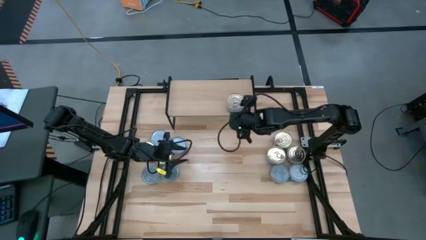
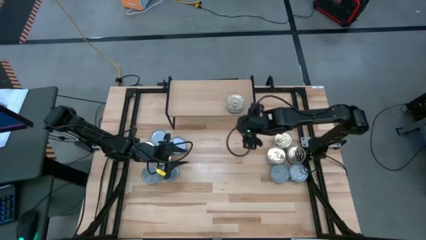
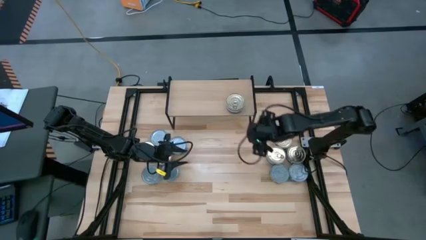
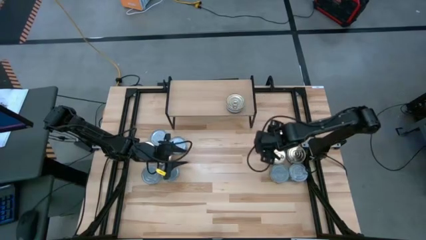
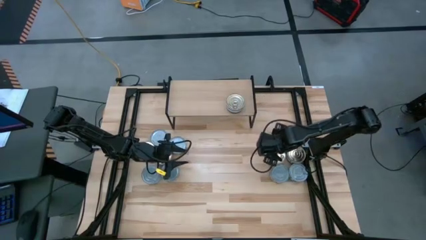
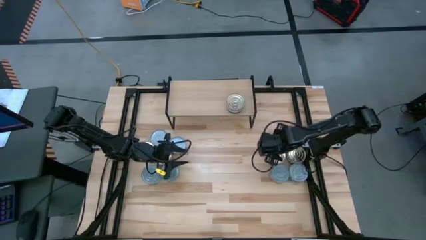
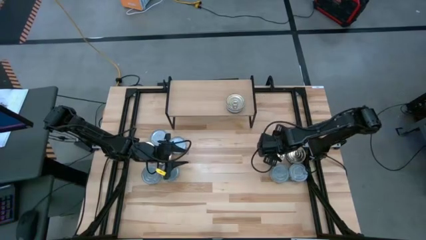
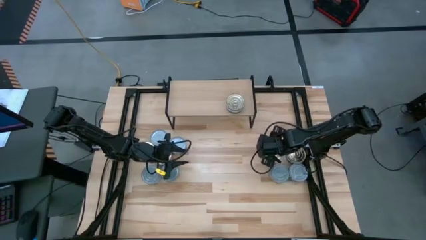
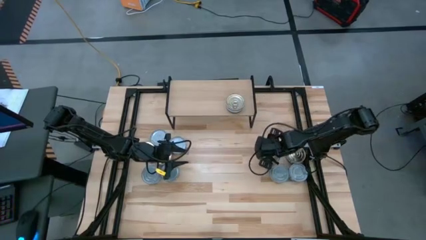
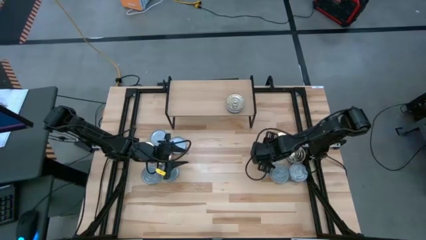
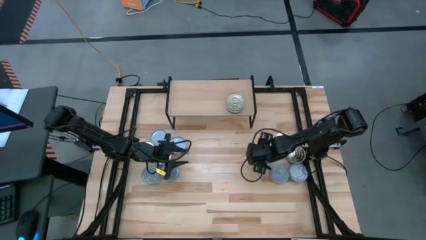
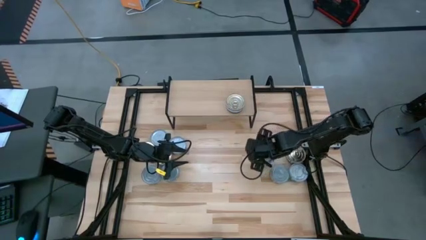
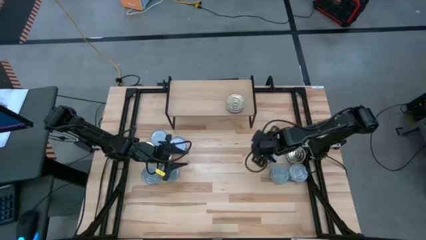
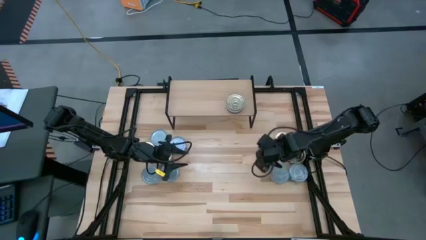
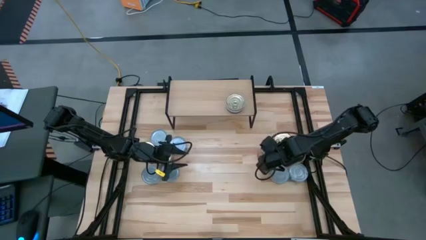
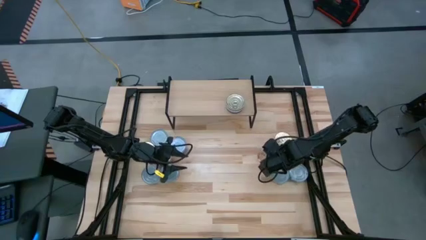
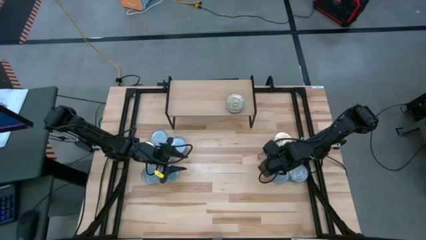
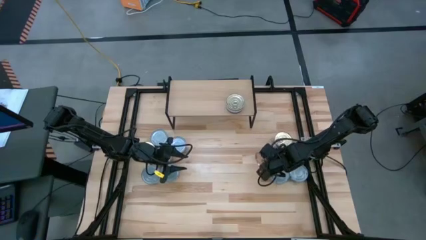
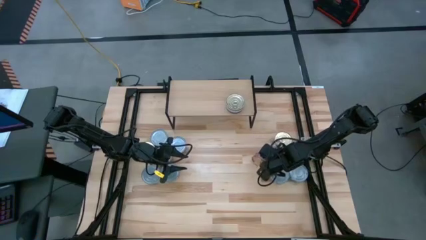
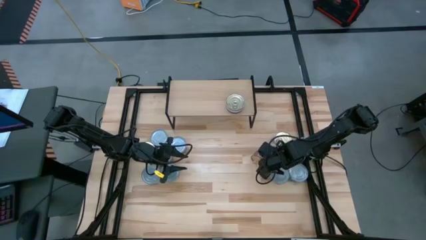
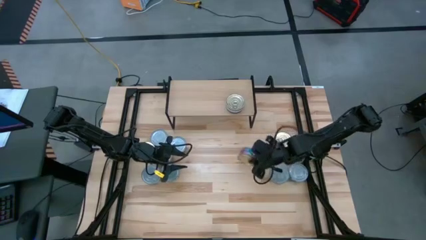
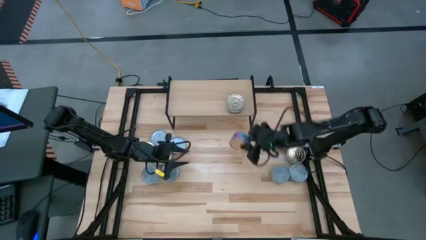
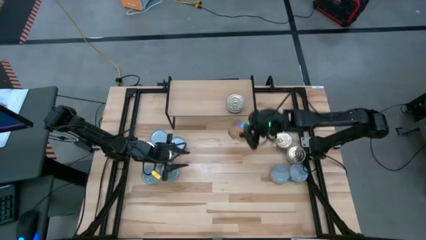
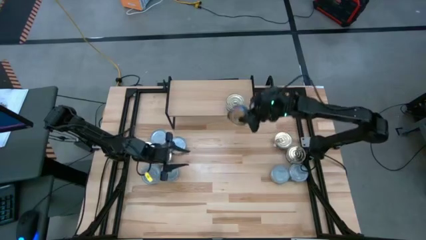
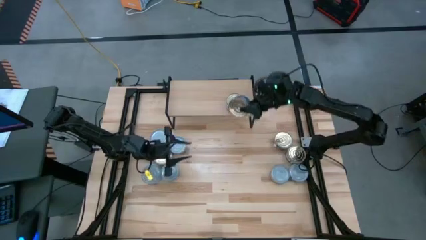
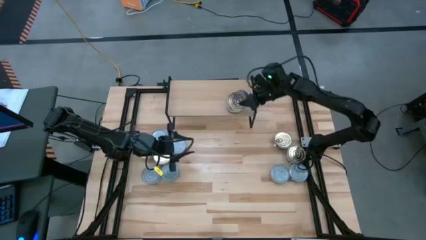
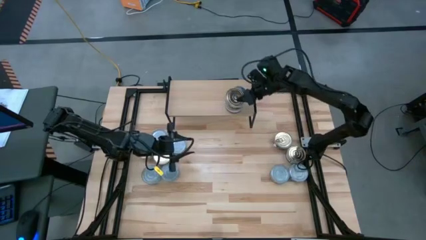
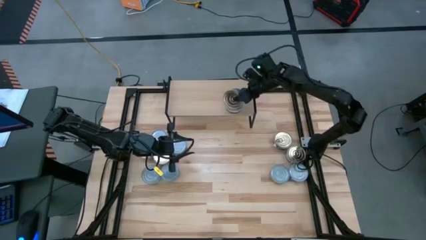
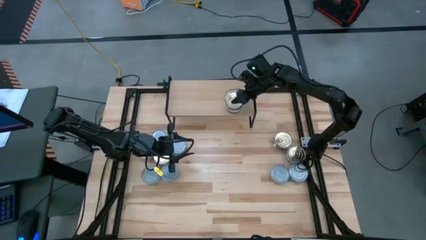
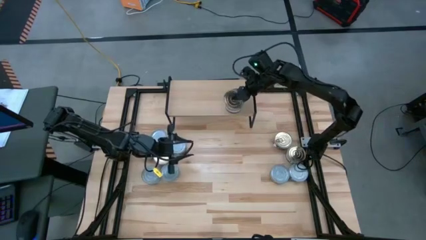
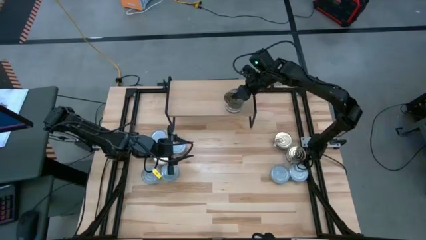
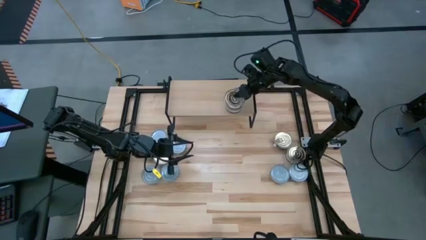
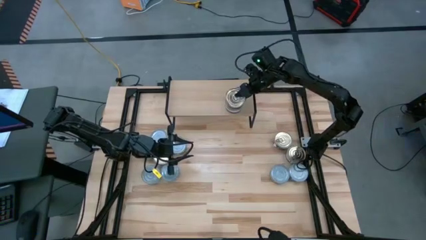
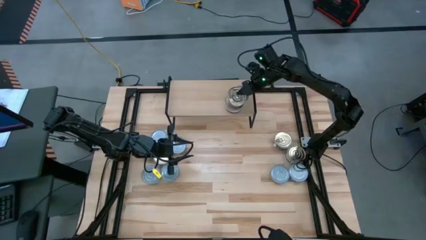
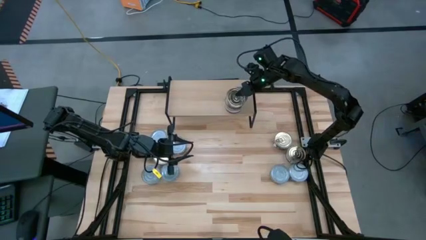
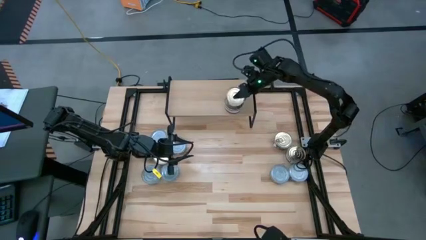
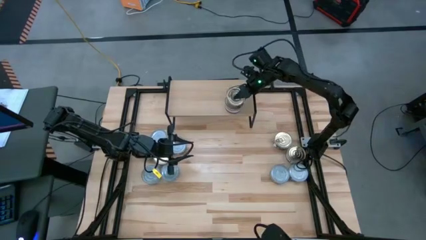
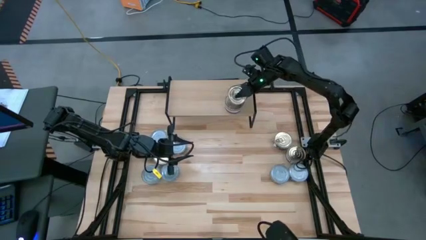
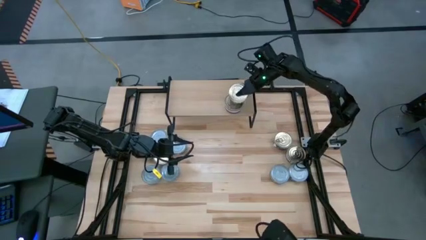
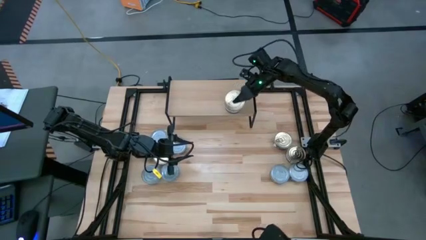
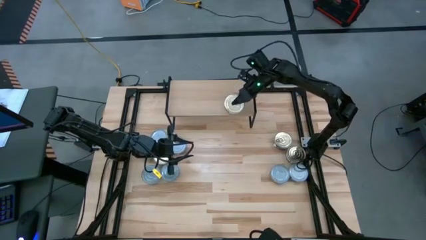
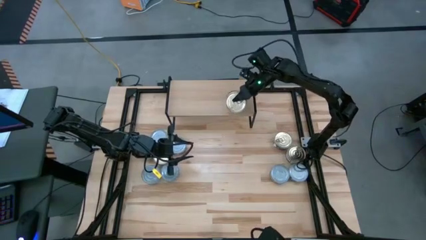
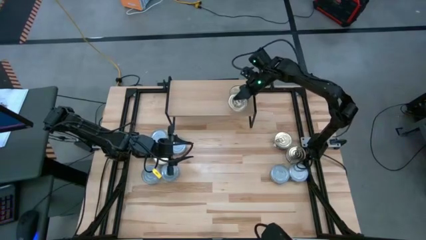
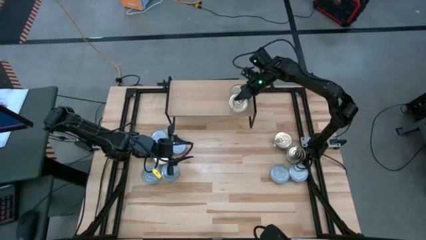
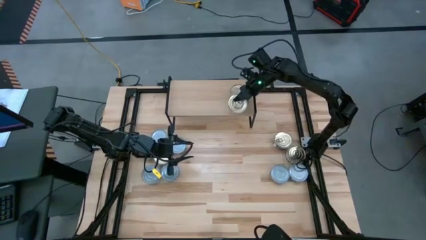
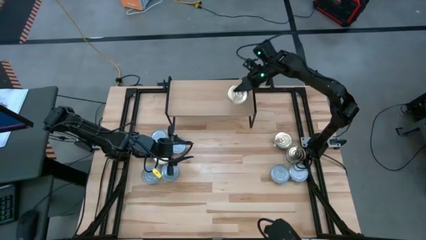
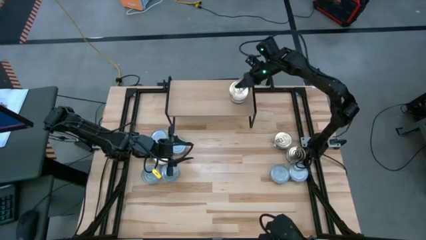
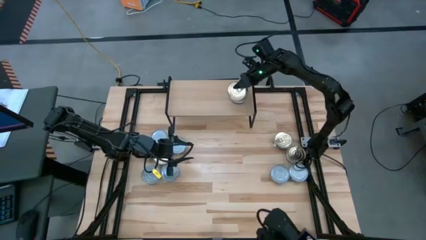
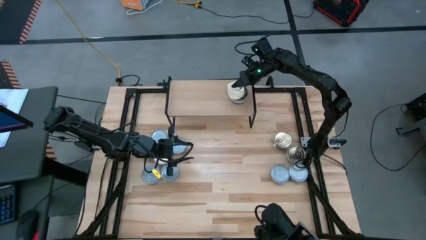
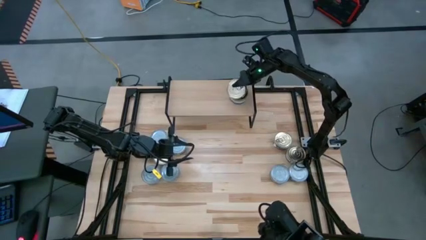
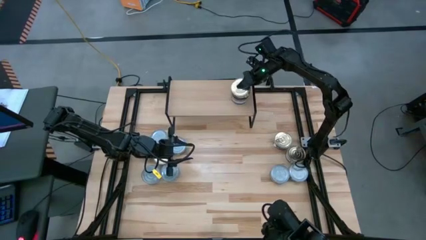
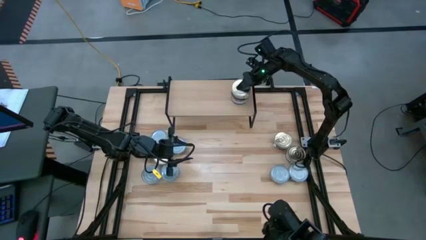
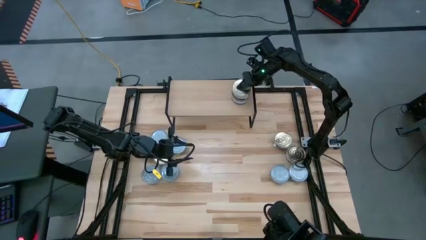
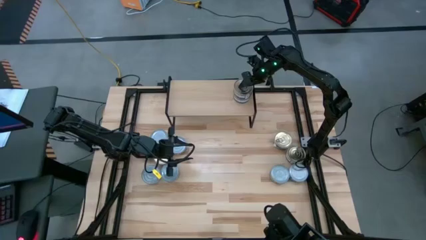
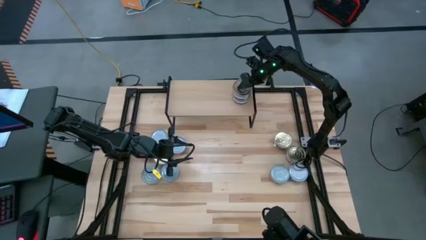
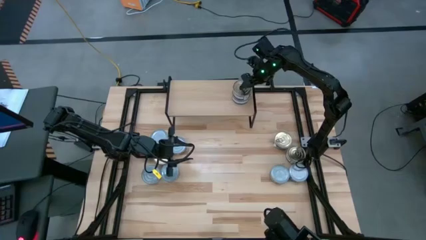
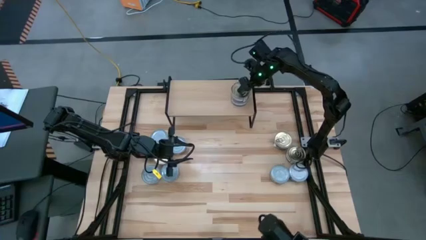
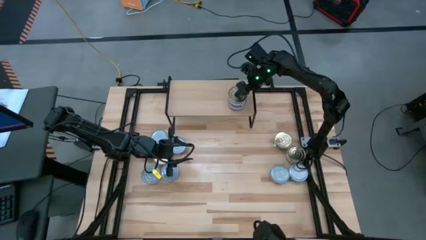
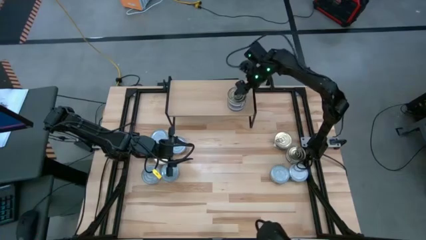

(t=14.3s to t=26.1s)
Task: Stack canned seafood by type on shelf
Stack the pink and blue tuna can on top of the pink and blue tuna can on the shelf

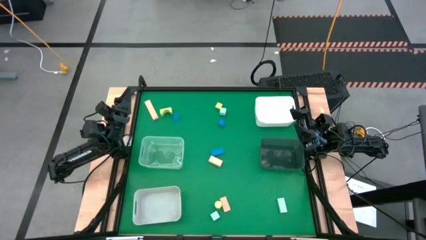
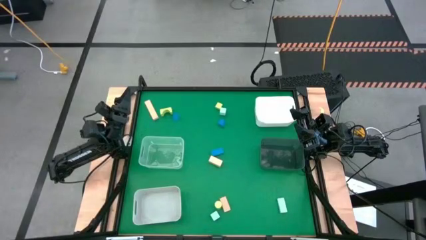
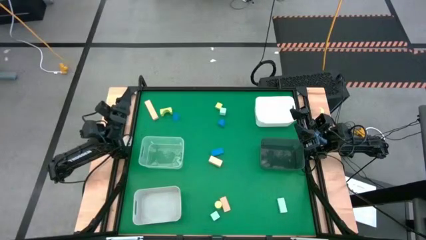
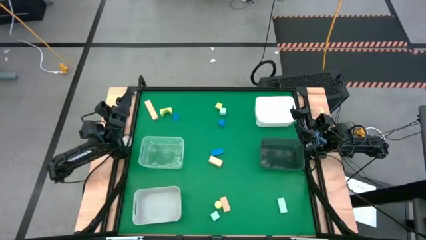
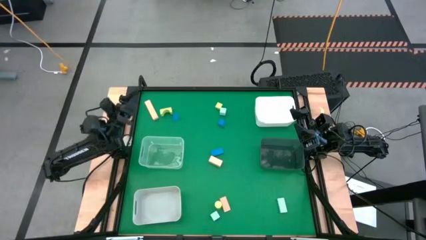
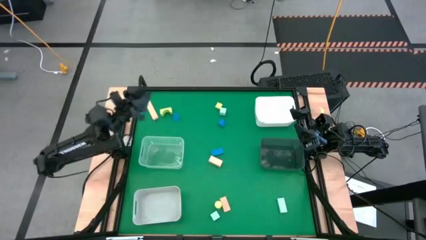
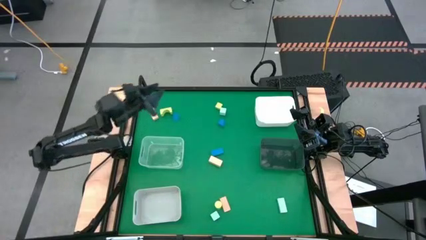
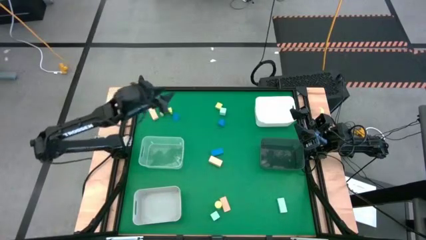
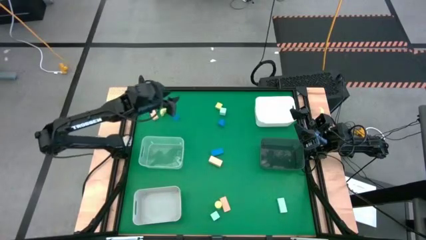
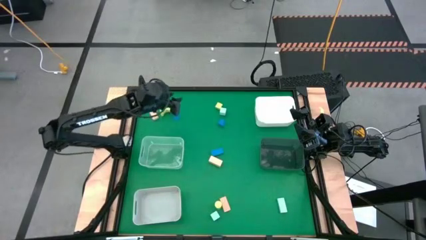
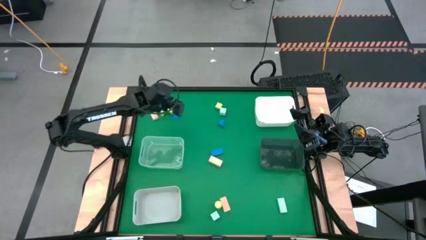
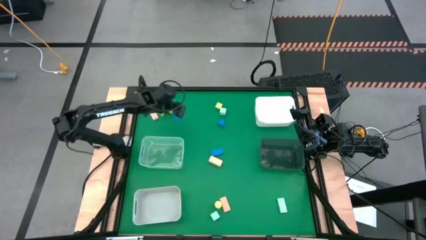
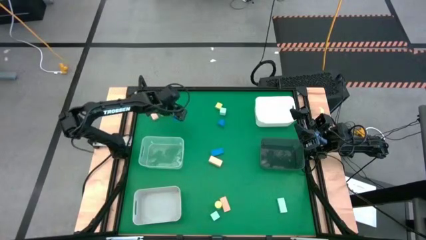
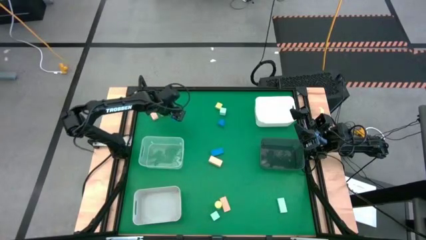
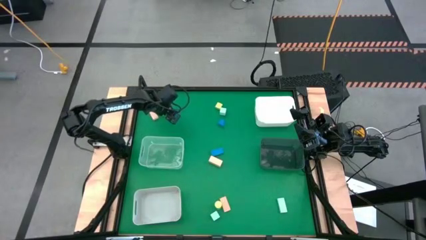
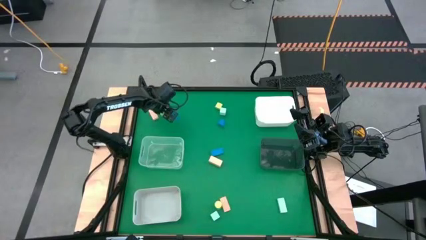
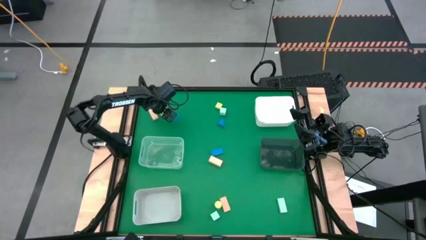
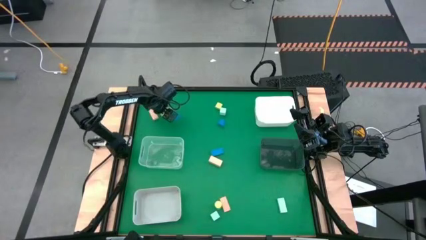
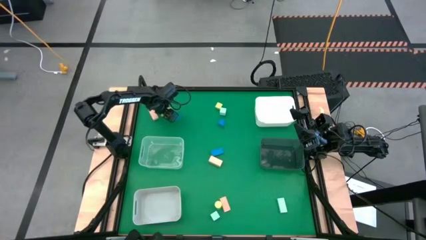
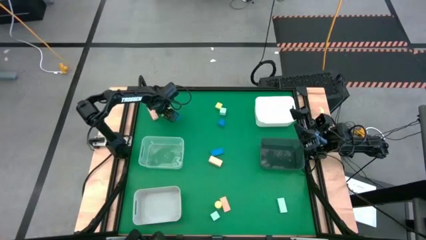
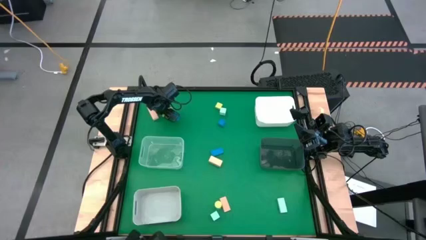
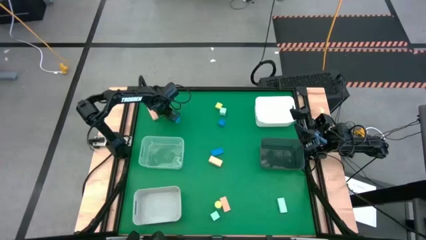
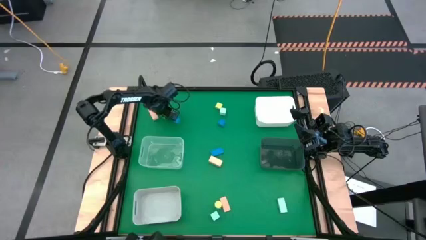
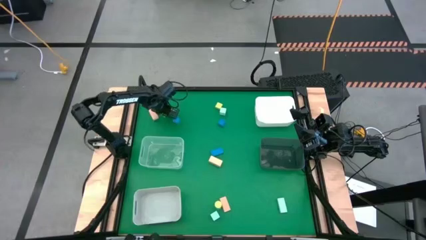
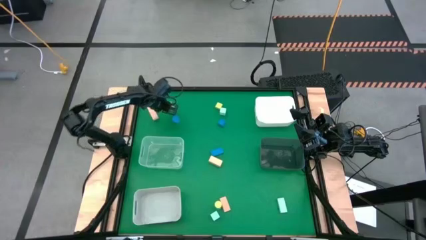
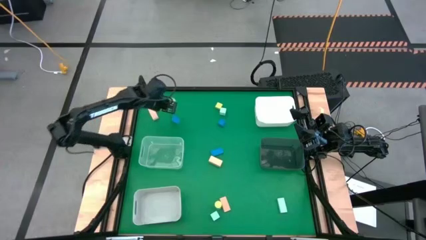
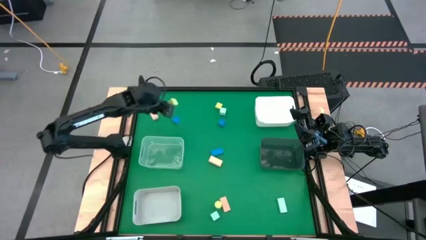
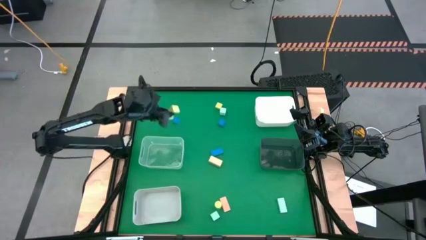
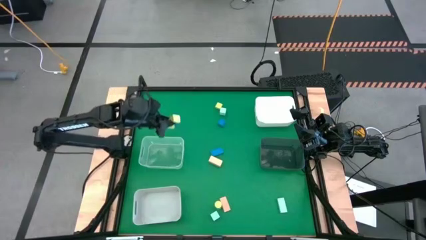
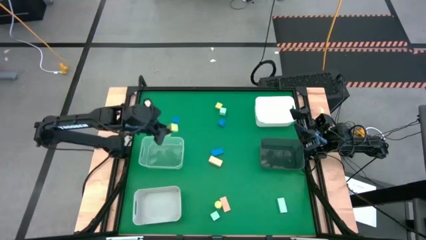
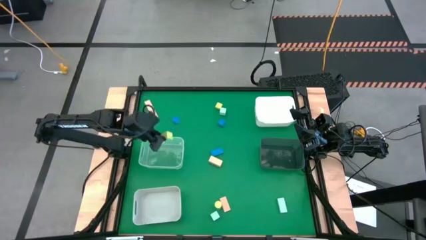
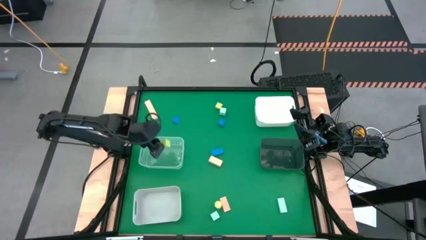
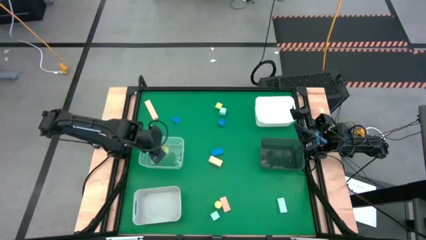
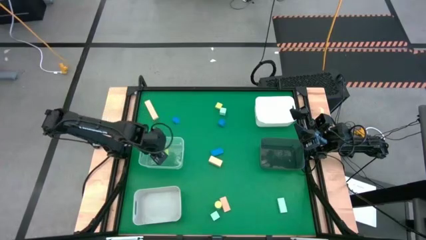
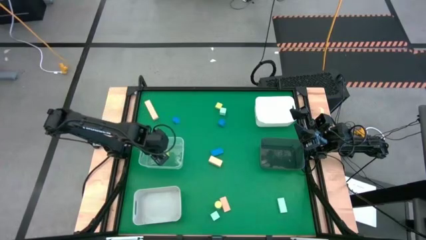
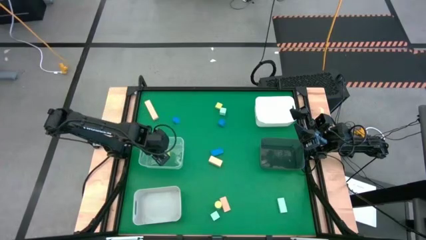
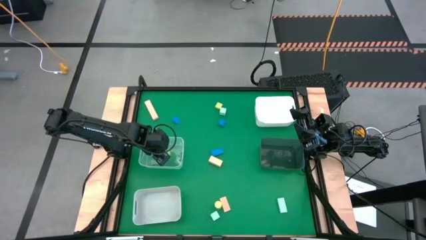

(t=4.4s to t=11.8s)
Task: Sort & place blocks by color
Put the green block into the transparent bin
